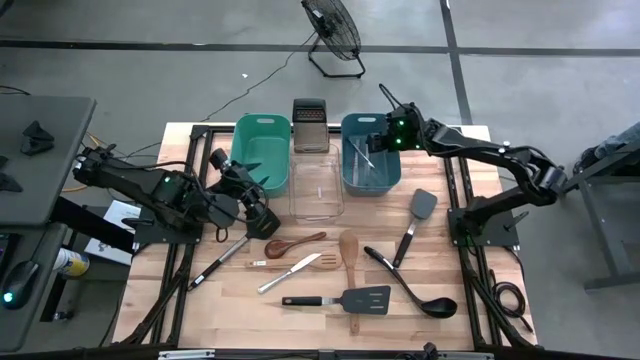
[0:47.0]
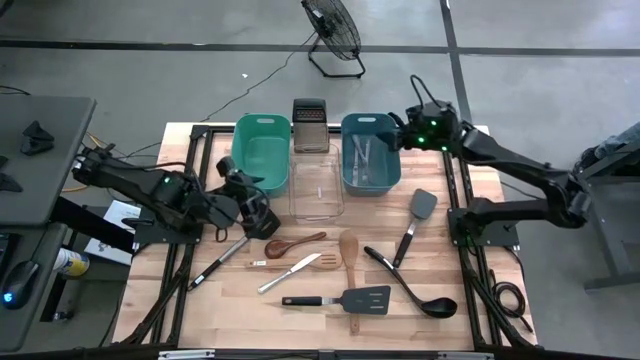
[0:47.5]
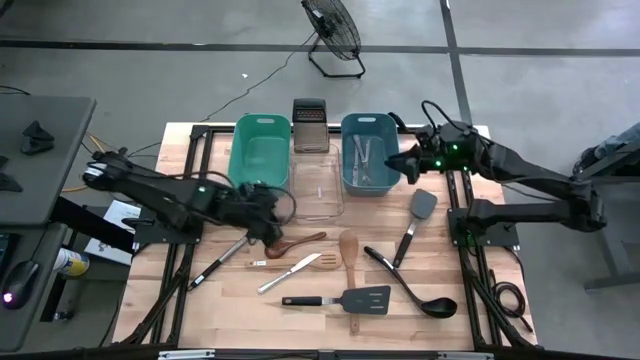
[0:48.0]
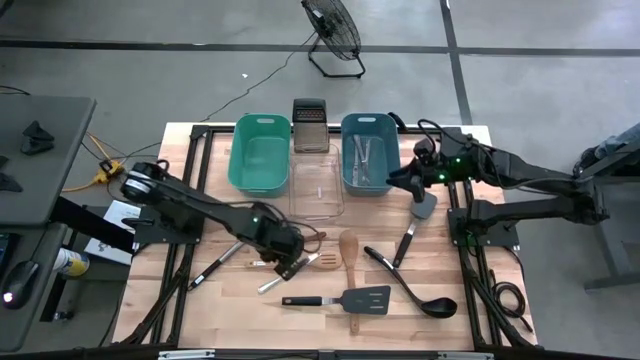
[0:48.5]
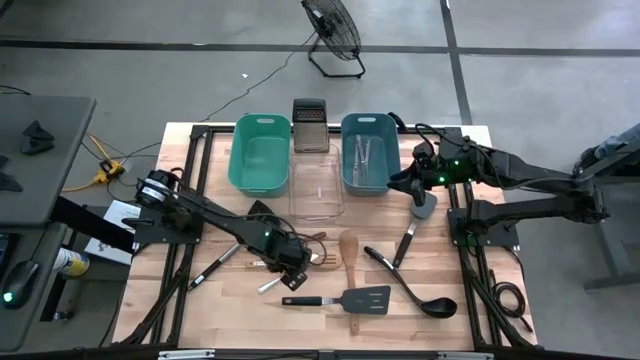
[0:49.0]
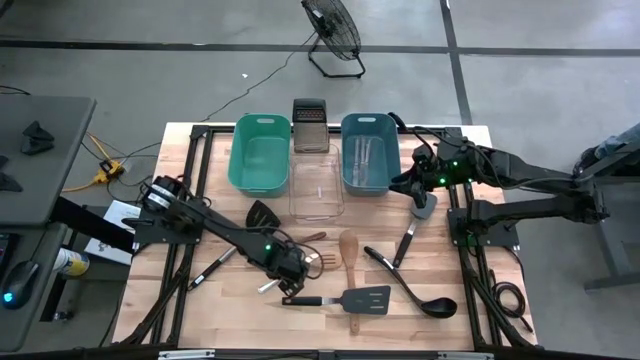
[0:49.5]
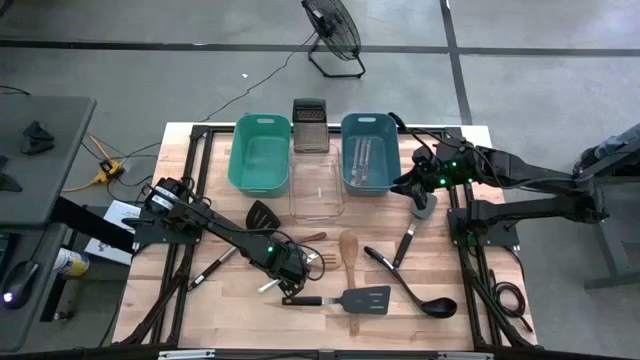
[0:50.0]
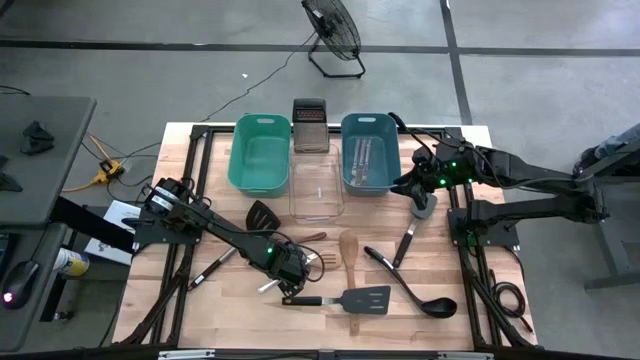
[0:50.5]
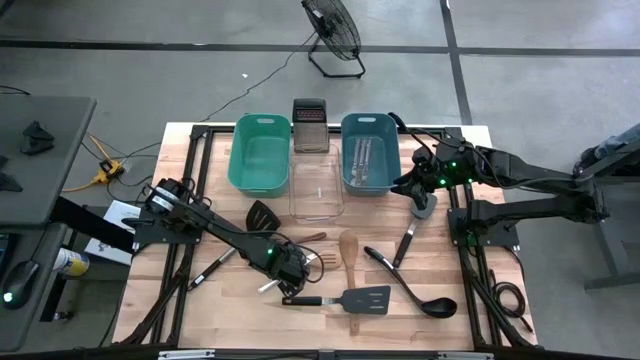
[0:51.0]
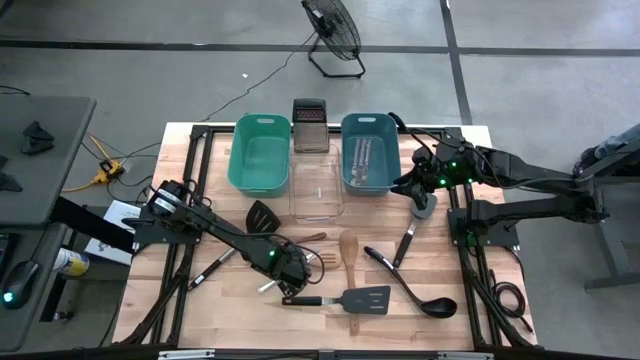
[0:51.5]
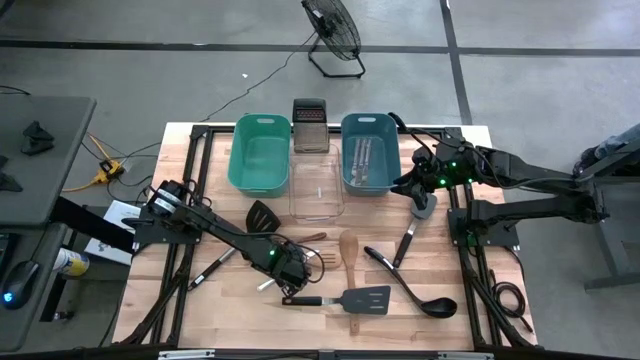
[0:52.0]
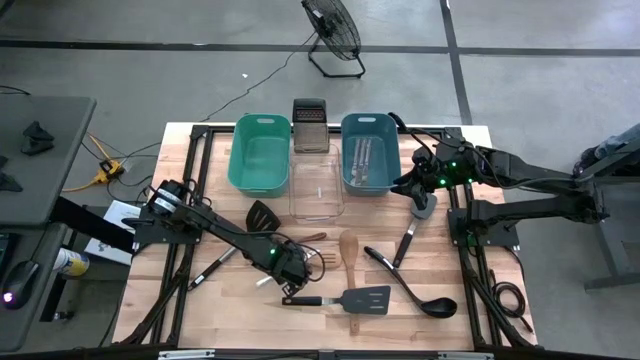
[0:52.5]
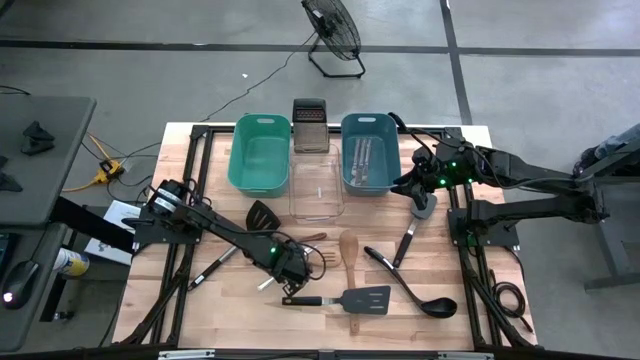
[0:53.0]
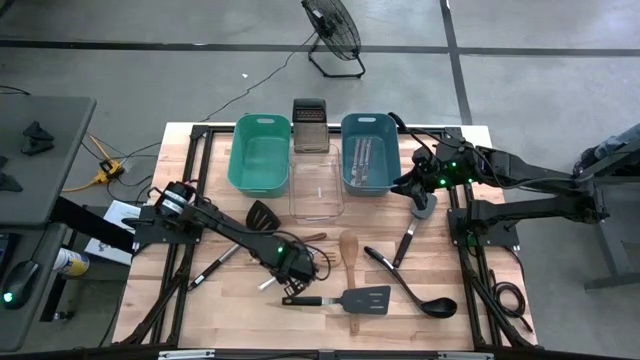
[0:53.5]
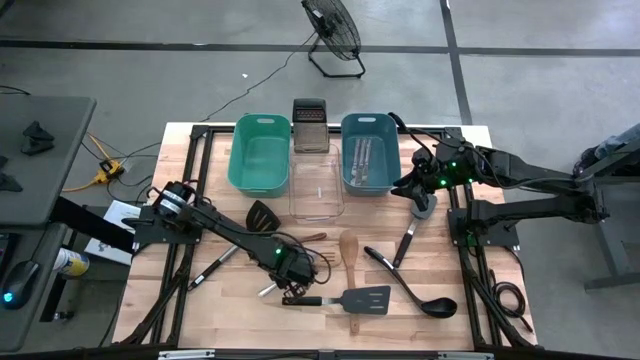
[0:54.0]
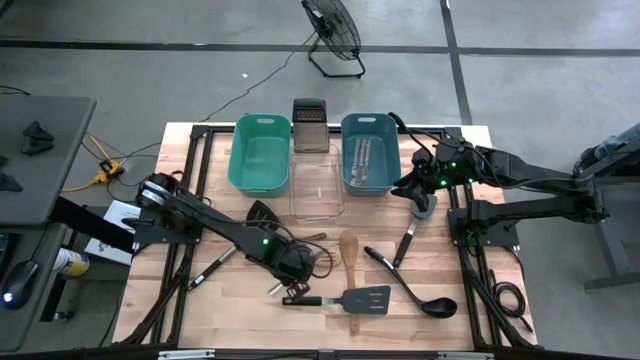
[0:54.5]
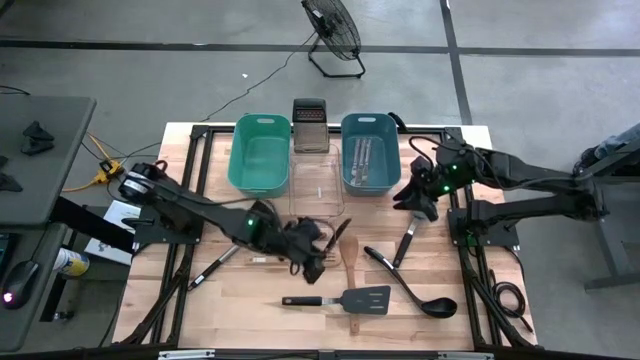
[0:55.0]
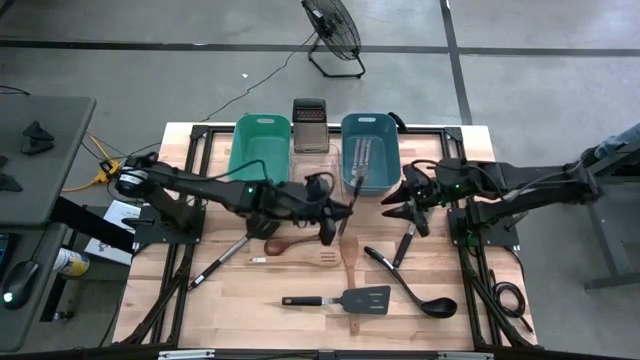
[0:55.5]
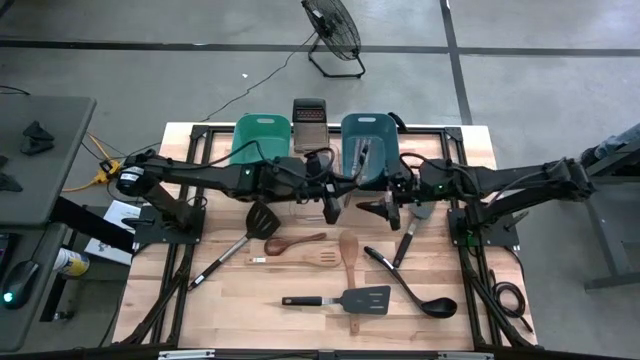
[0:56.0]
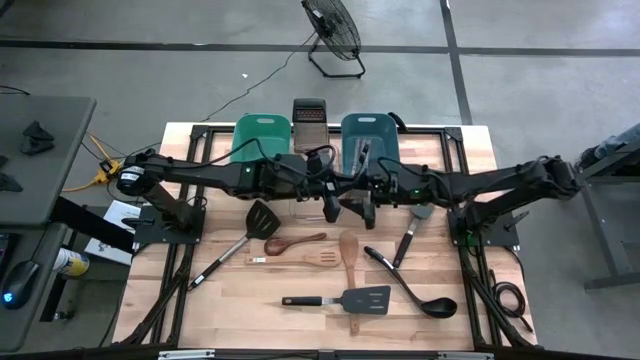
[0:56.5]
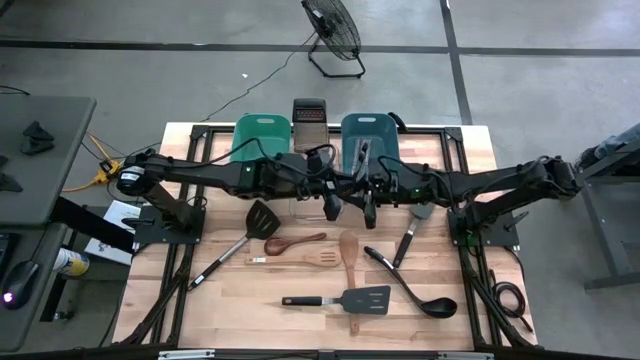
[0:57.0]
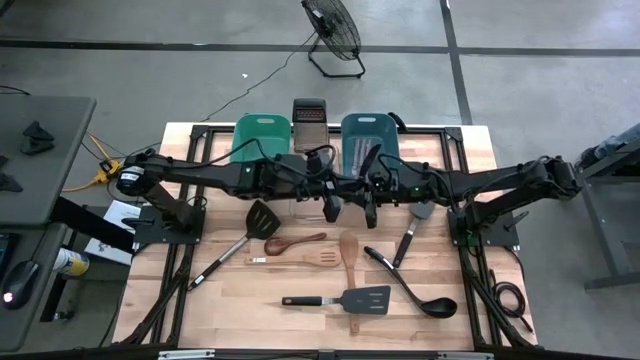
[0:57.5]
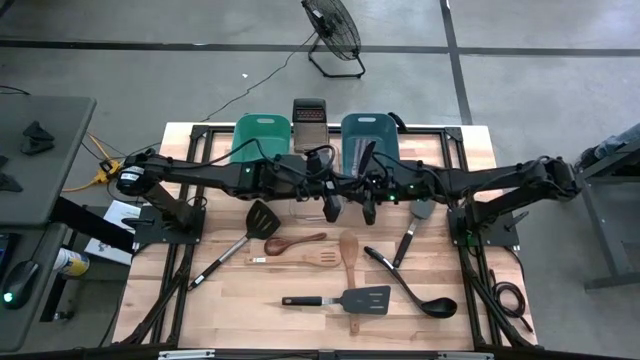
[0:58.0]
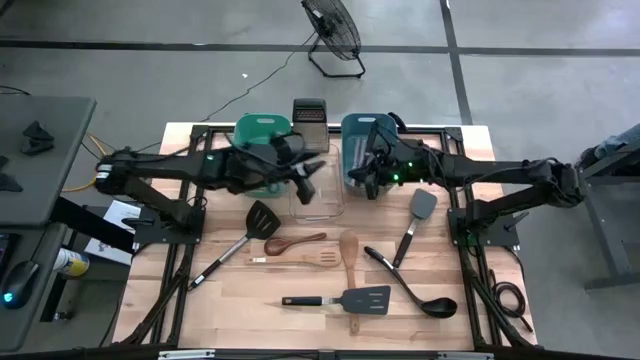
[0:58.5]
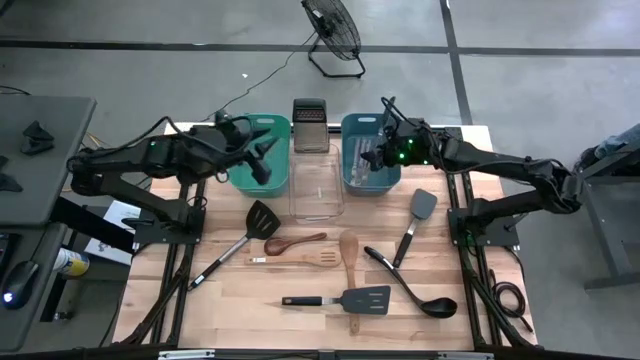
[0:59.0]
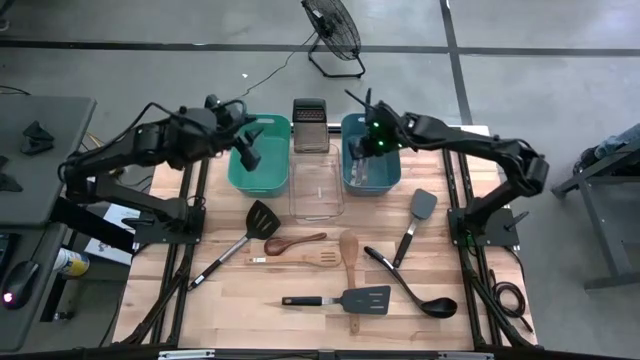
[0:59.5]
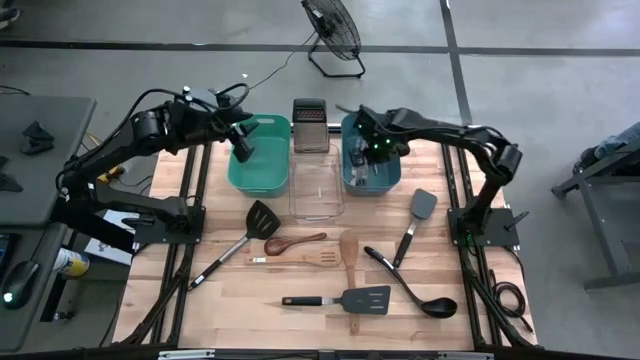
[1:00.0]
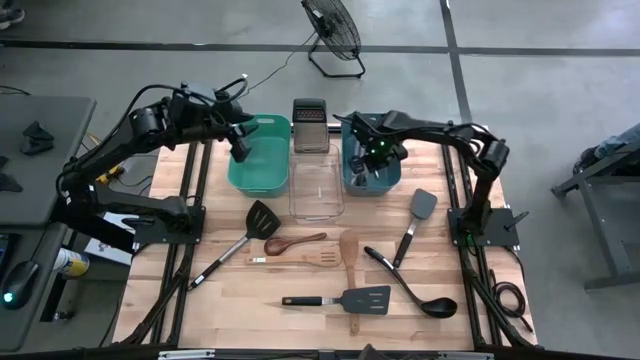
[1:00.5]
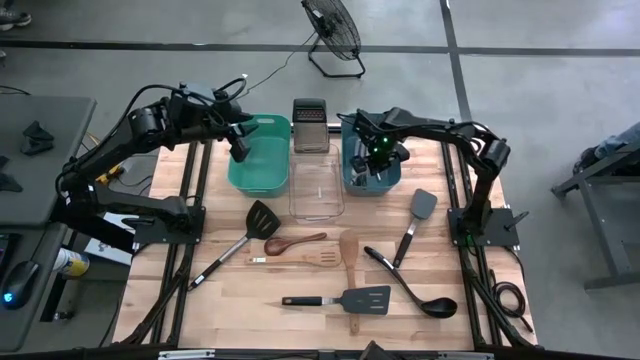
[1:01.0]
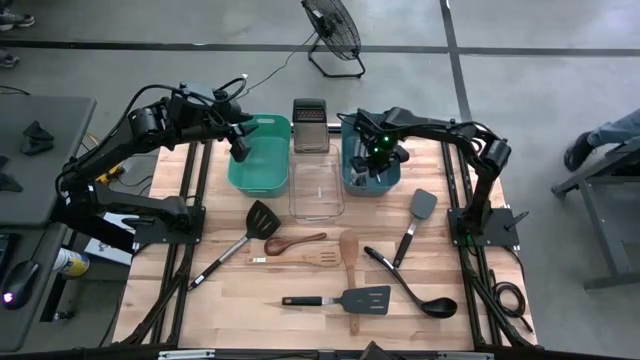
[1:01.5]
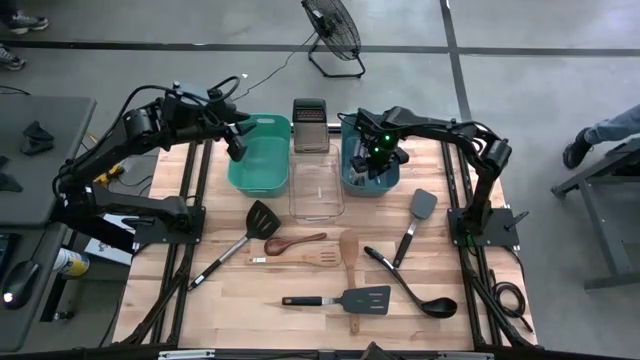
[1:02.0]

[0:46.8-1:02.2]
Task: Pick & Place Kitchen Items
Put the table knife into the blue bin

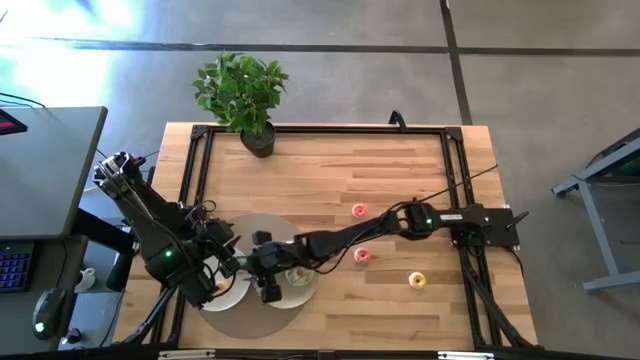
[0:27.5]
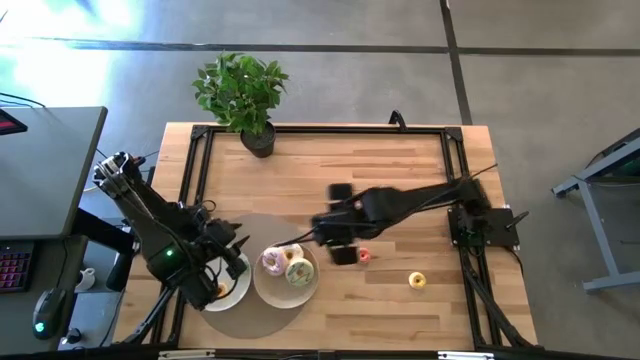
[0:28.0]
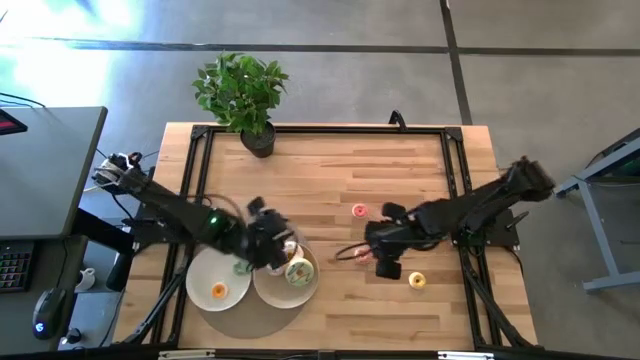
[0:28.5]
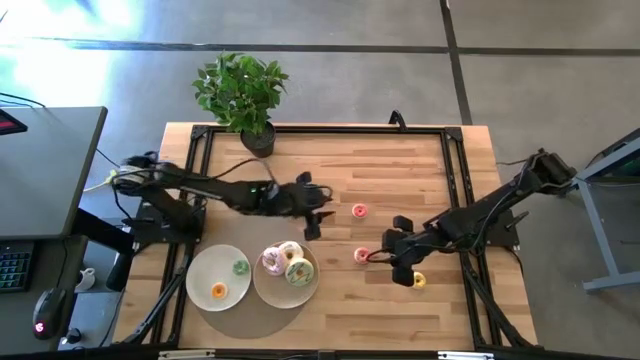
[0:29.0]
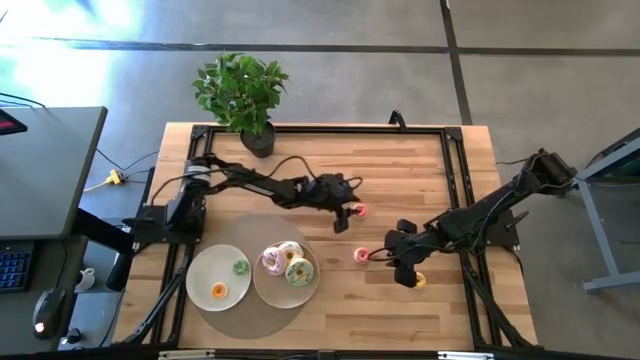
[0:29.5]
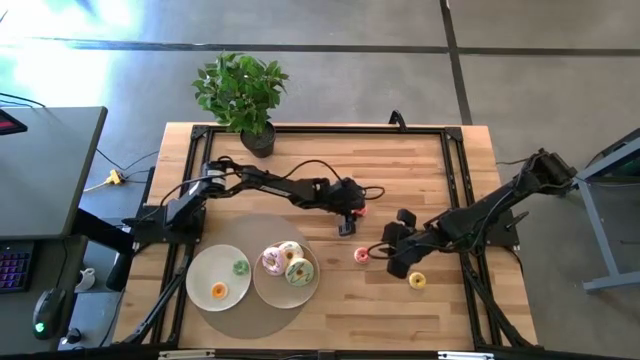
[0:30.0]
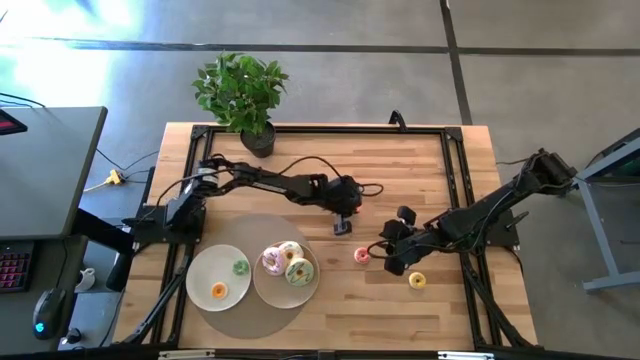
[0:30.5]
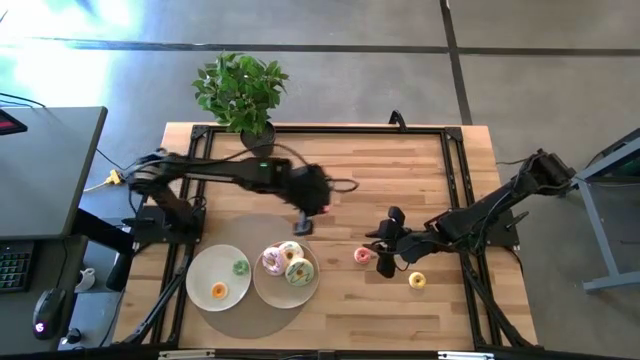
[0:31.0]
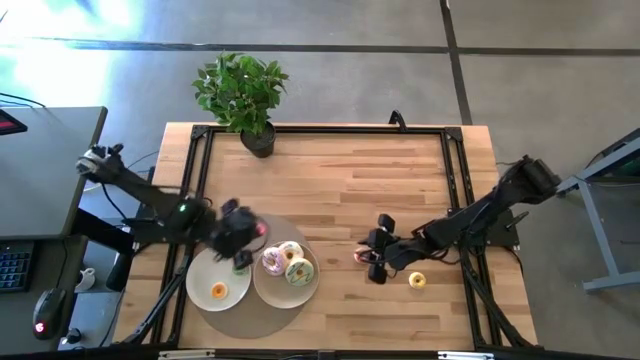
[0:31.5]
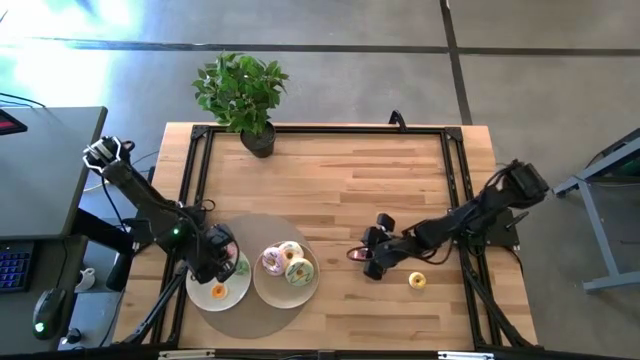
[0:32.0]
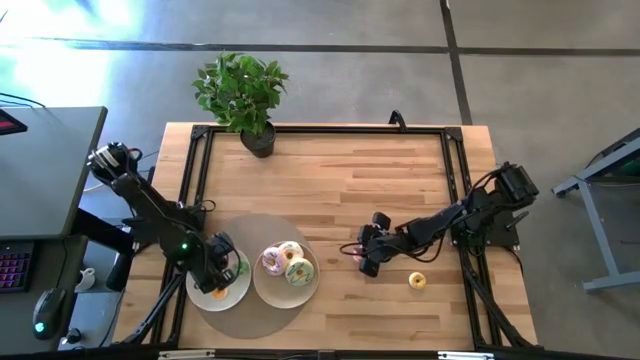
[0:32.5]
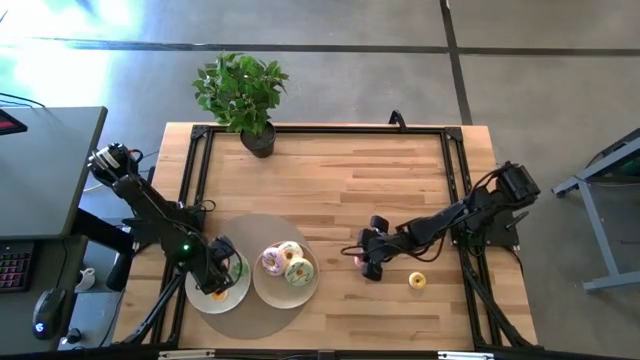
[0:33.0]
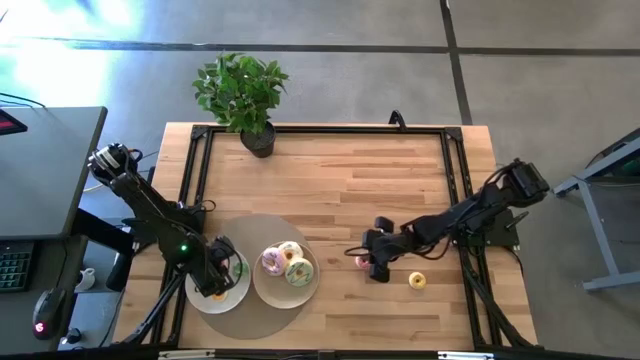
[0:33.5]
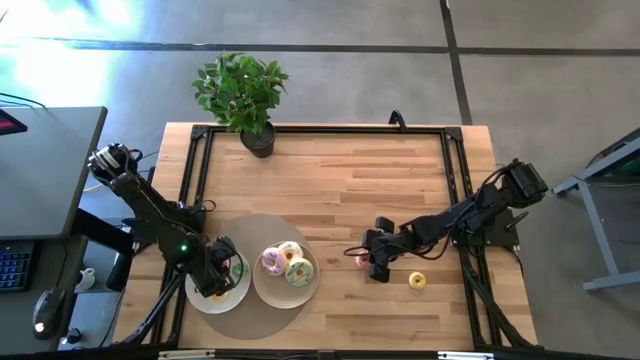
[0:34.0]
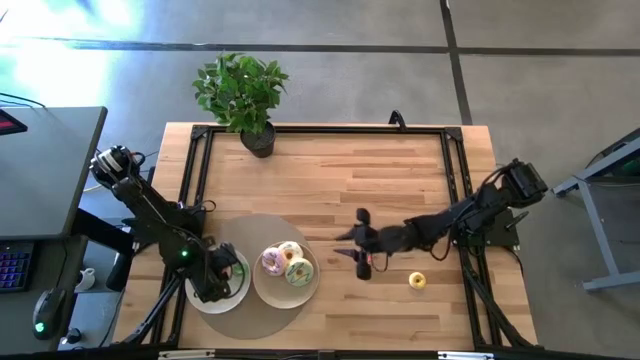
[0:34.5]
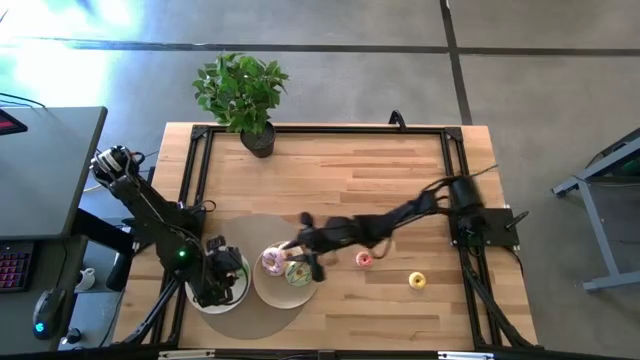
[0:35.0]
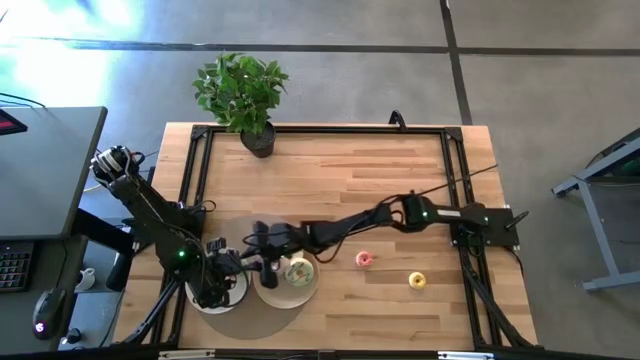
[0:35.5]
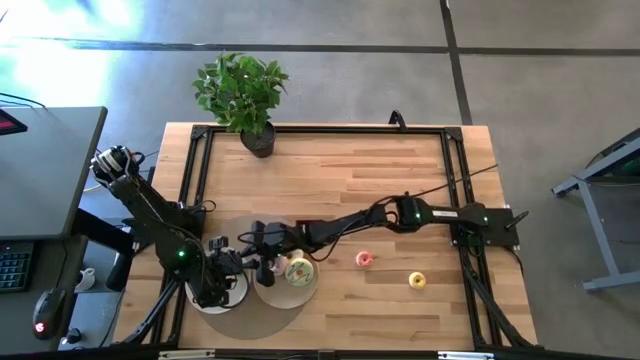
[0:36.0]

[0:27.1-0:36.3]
Task: Pick & Place donuts
Put the top small pink donut on the white plate
